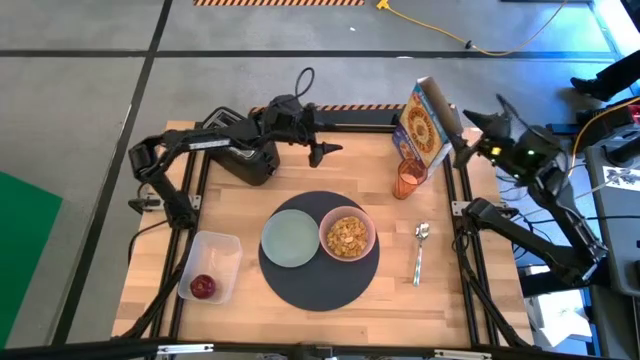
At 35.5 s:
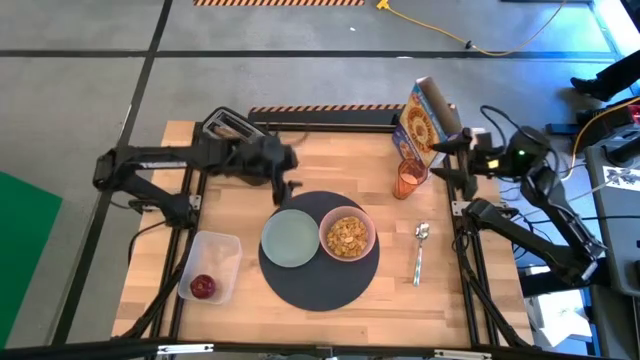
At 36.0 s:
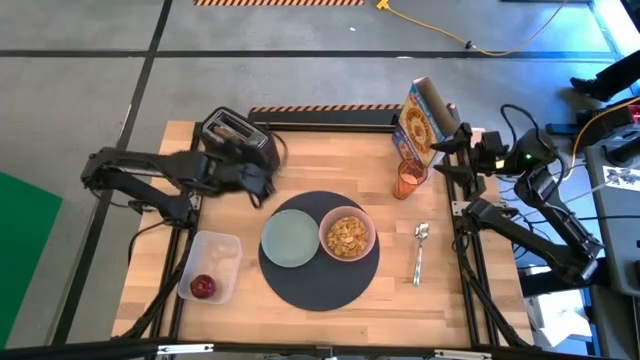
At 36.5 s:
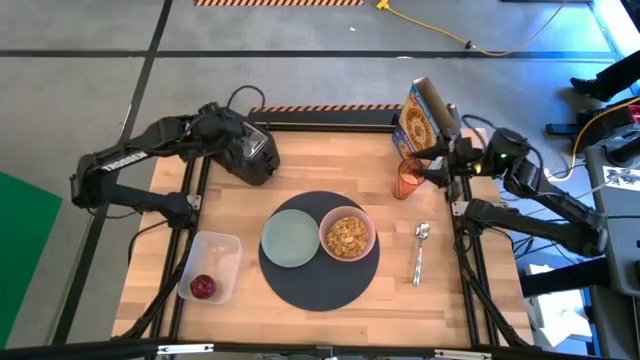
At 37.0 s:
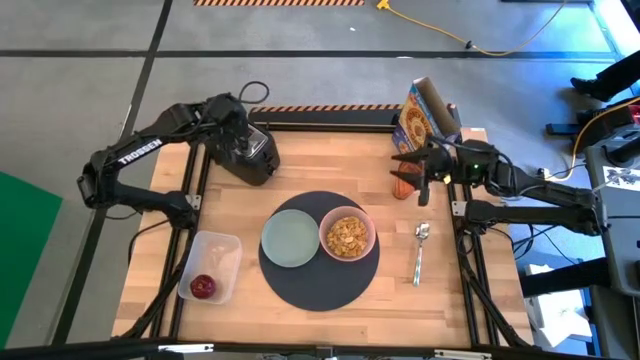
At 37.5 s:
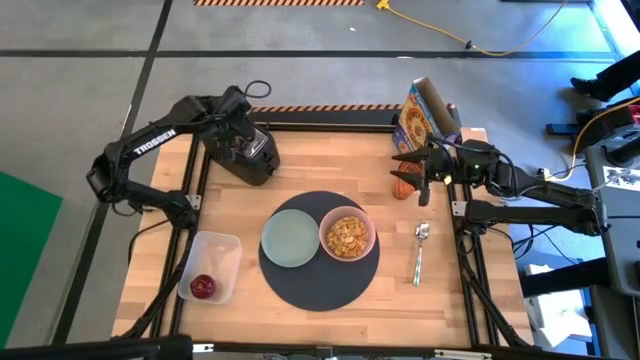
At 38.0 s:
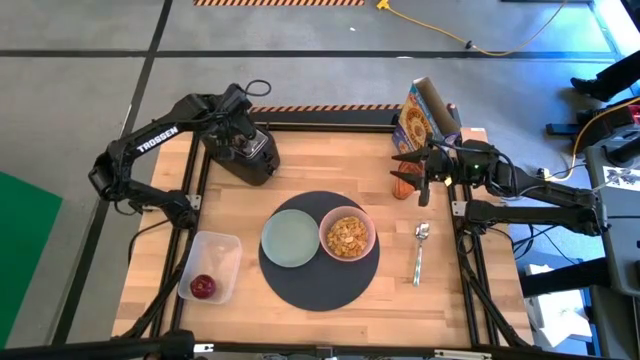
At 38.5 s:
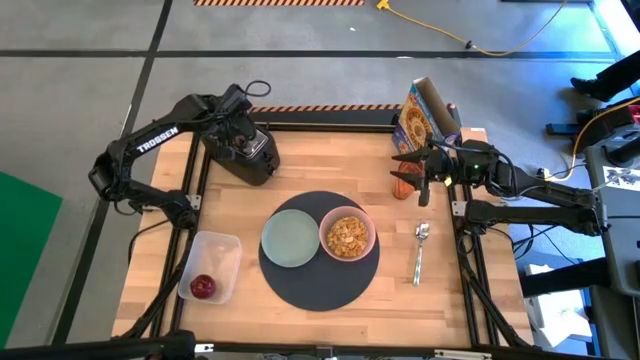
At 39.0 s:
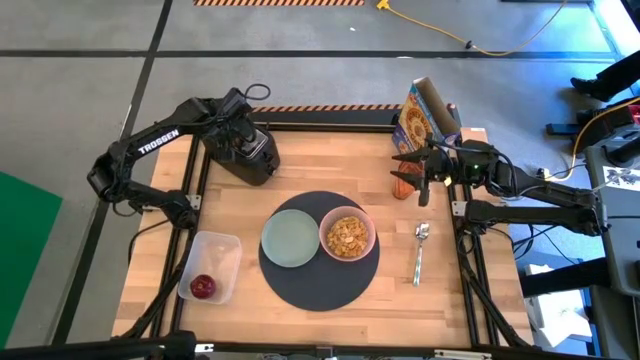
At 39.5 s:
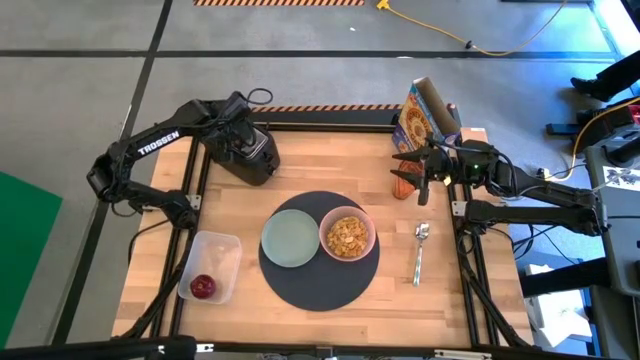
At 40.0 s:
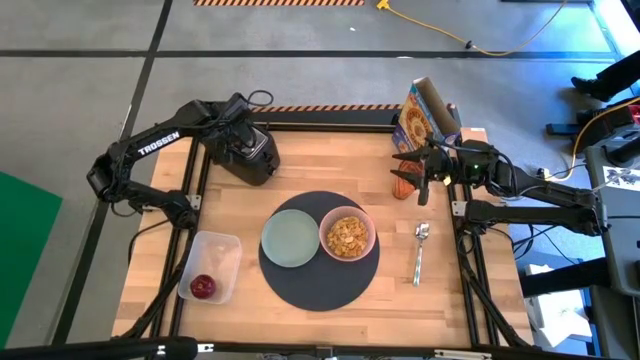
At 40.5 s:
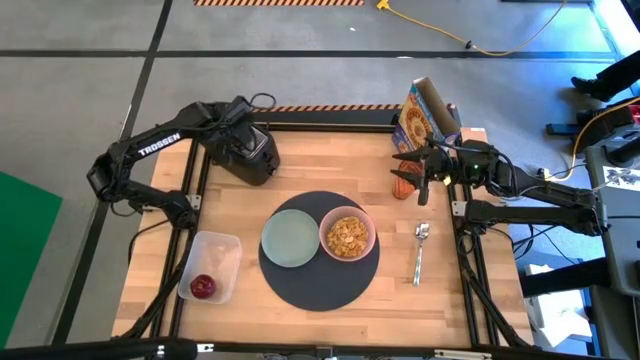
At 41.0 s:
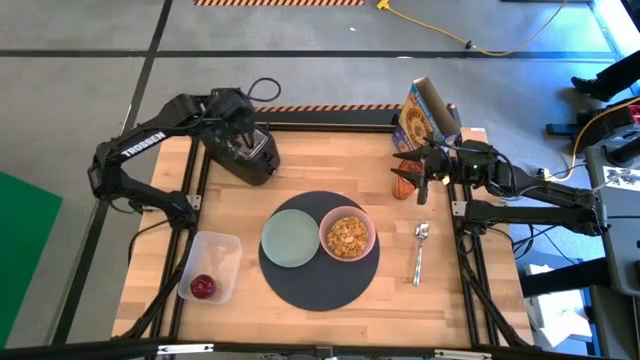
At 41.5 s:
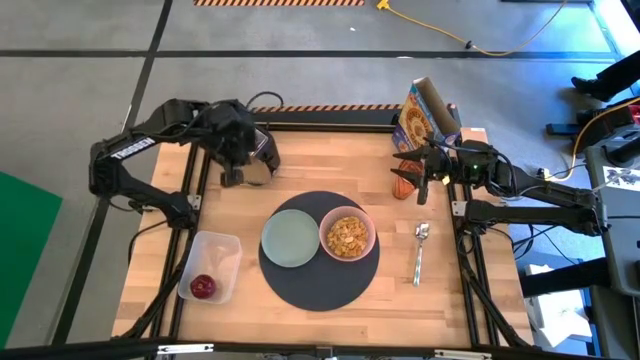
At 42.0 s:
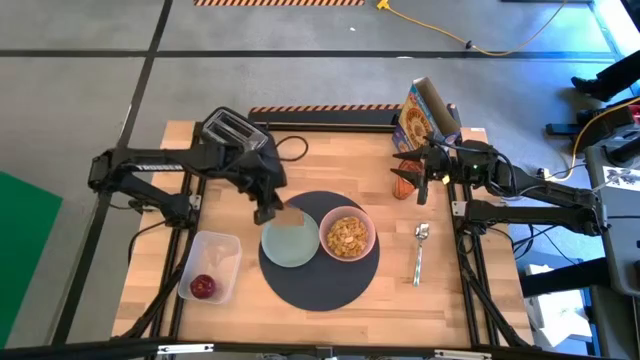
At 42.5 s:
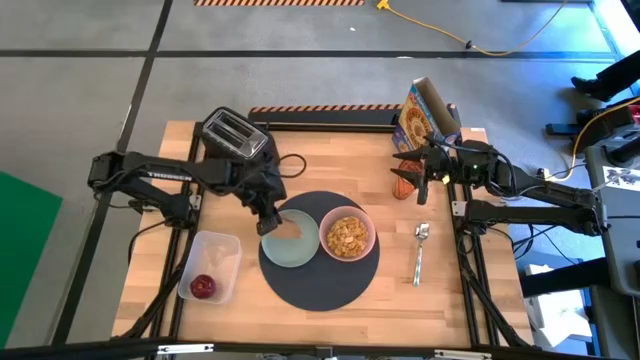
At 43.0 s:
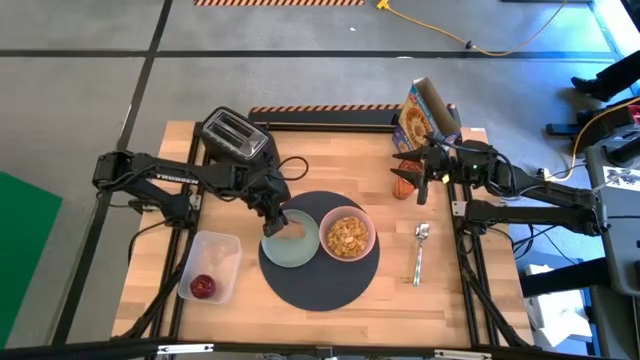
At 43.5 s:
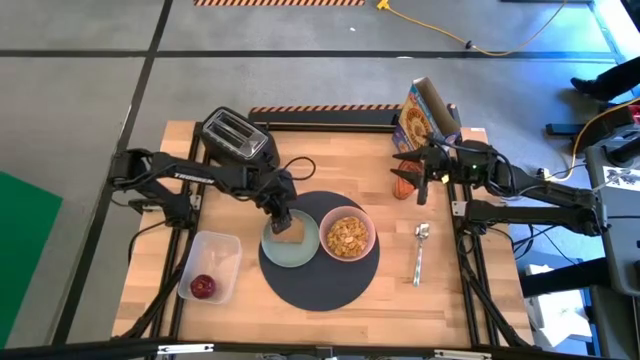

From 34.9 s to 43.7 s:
Task: Arrange a breakfast setting
Put the bread on the blue plate

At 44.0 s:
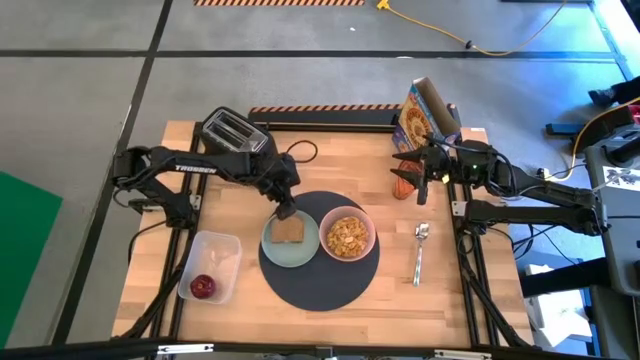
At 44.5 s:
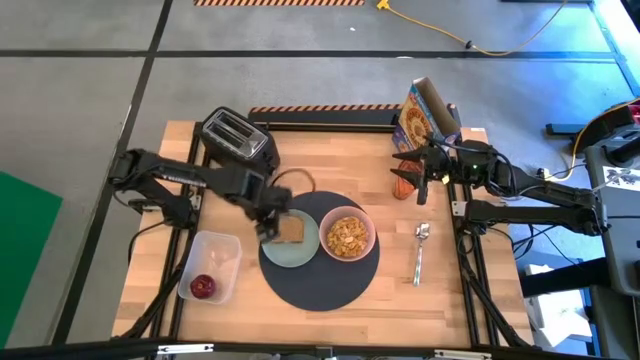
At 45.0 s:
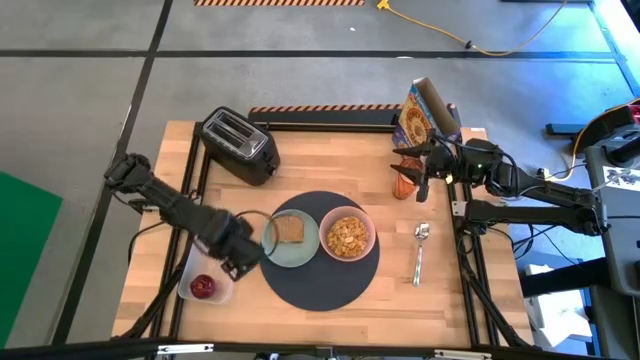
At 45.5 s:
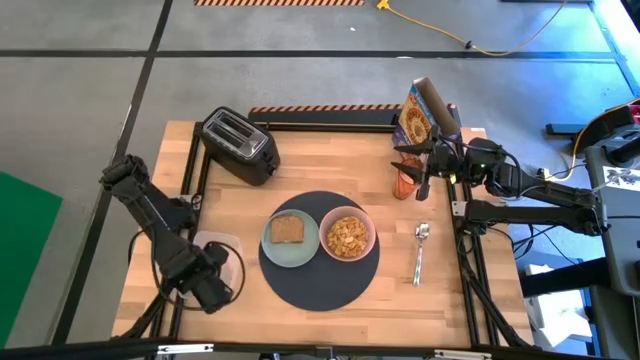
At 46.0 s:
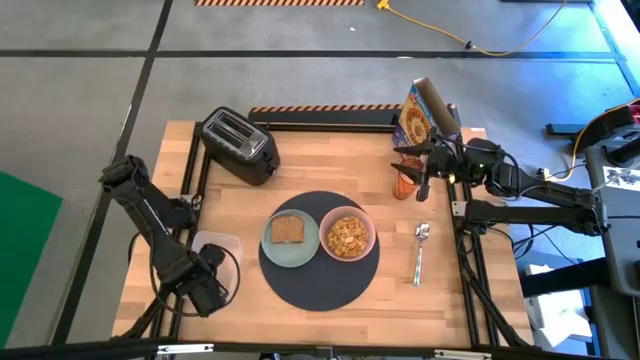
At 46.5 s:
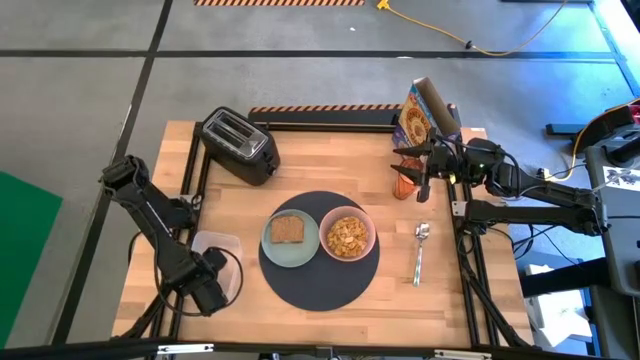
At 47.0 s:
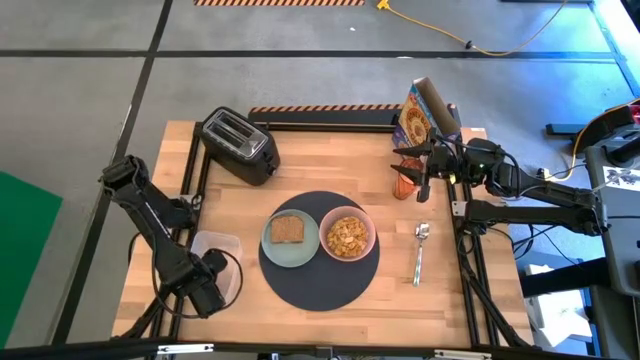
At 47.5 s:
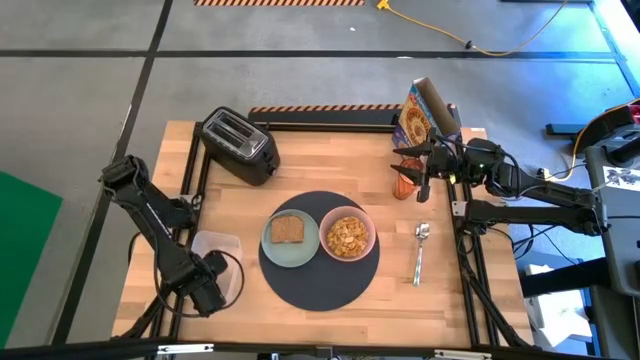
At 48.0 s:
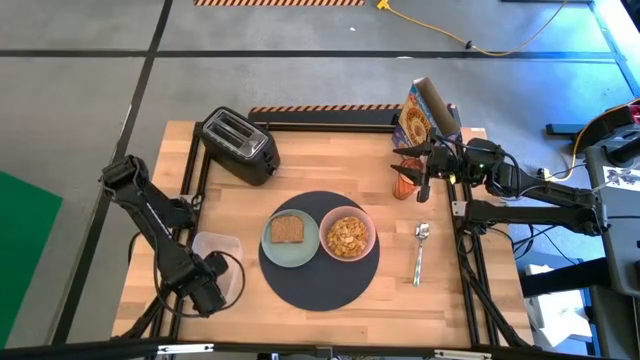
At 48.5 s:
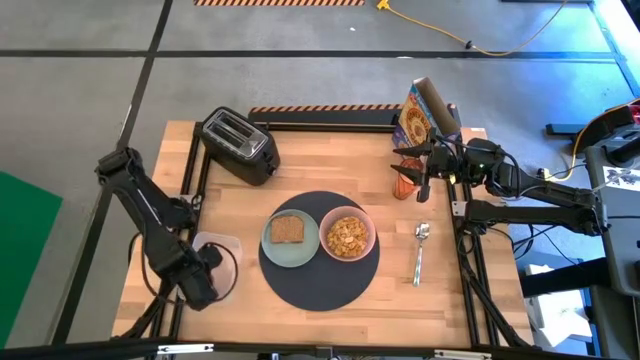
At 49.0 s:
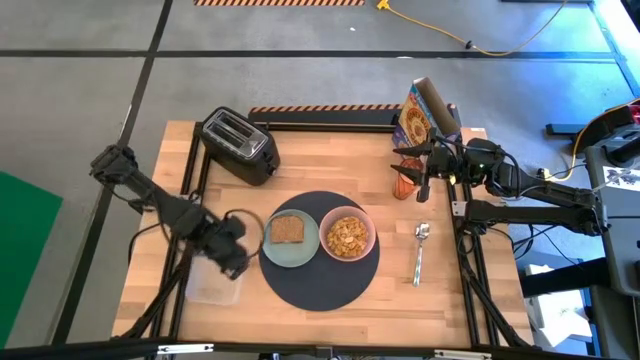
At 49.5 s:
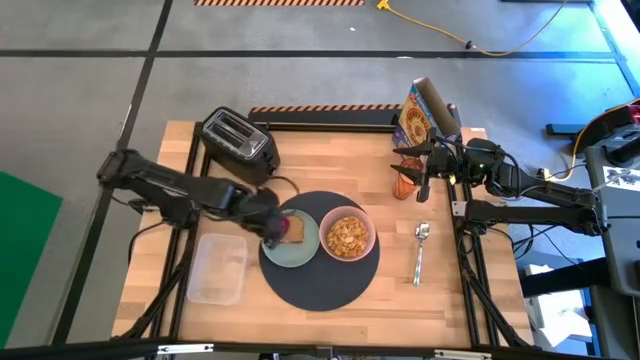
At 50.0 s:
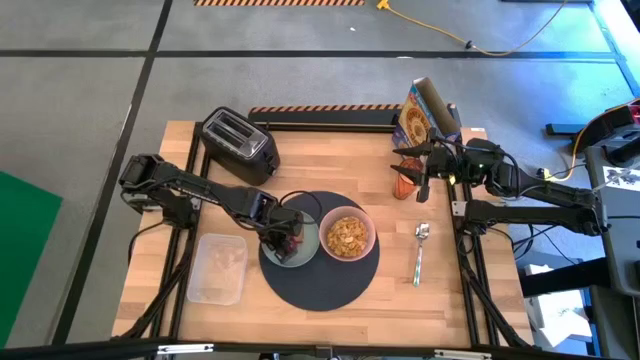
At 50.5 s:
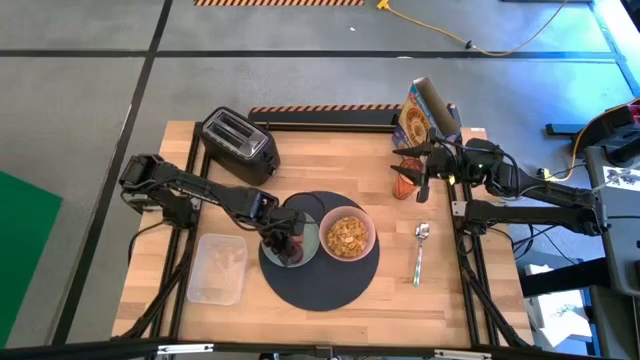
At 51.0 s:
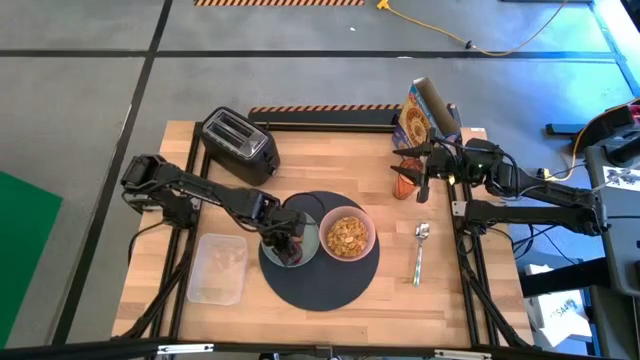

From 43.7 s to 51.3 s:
Put the apple on the blue plate

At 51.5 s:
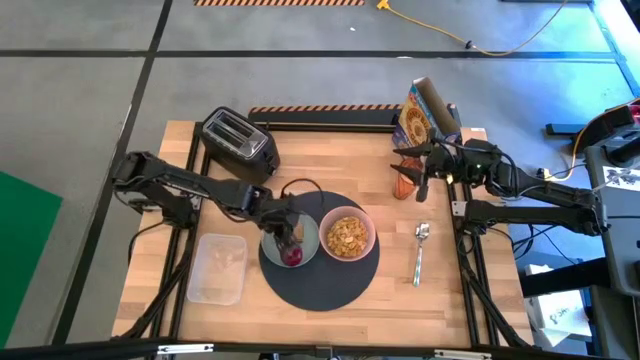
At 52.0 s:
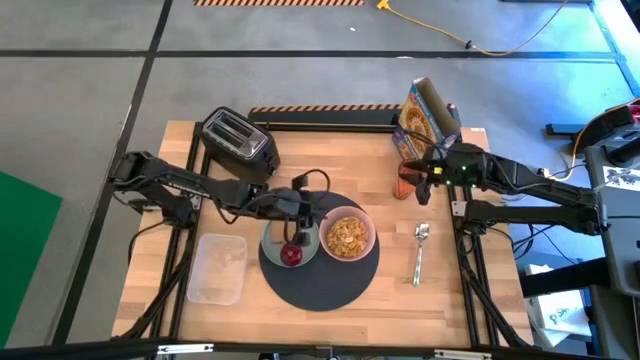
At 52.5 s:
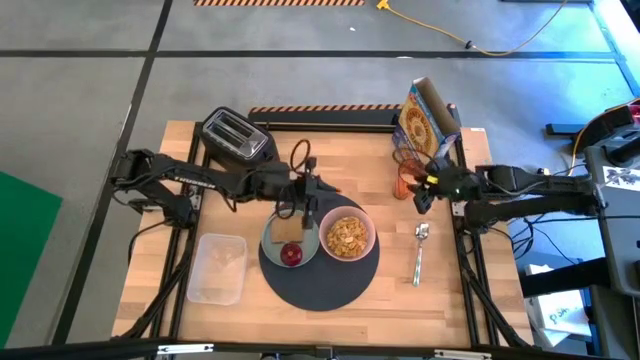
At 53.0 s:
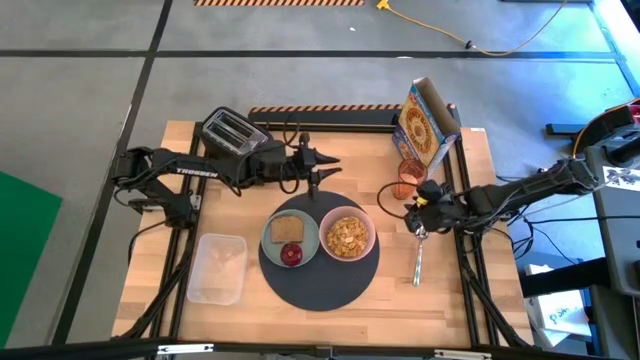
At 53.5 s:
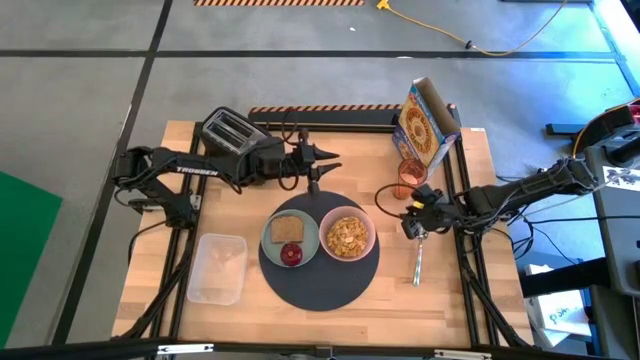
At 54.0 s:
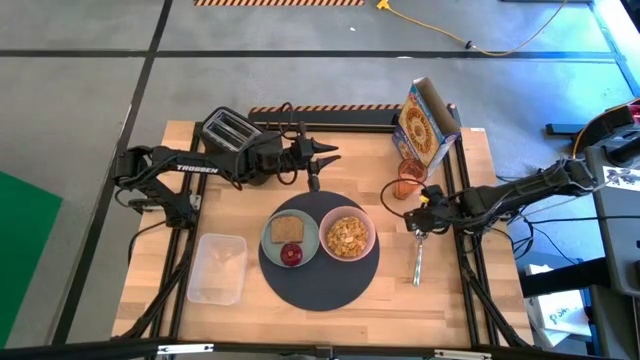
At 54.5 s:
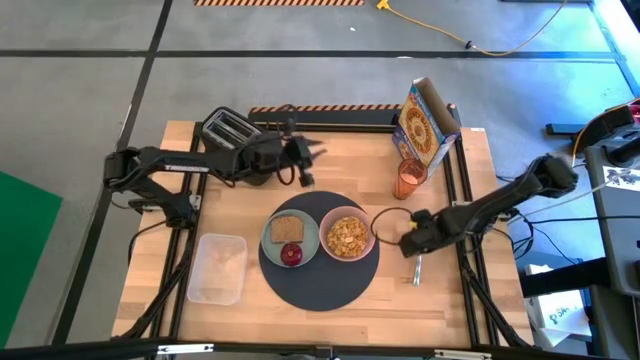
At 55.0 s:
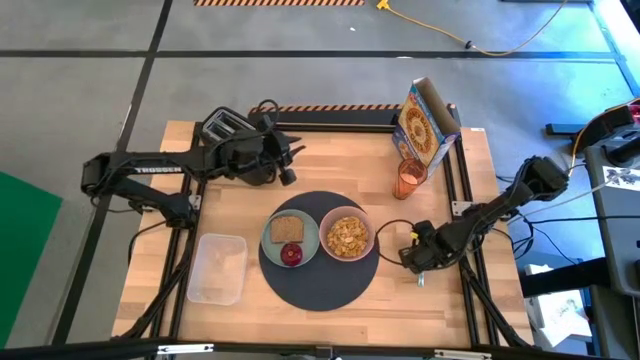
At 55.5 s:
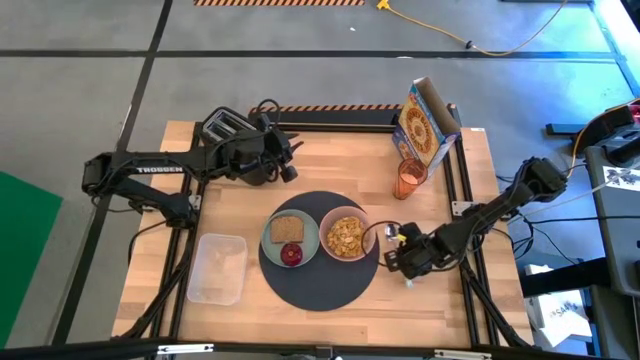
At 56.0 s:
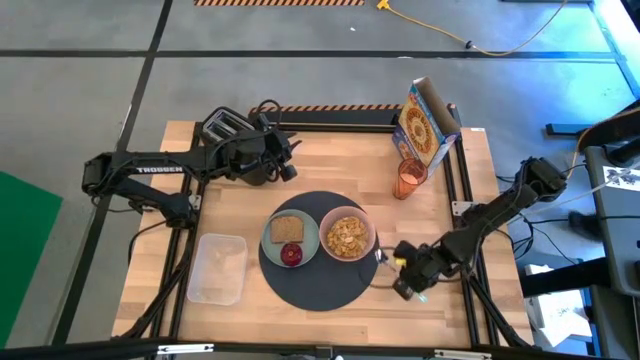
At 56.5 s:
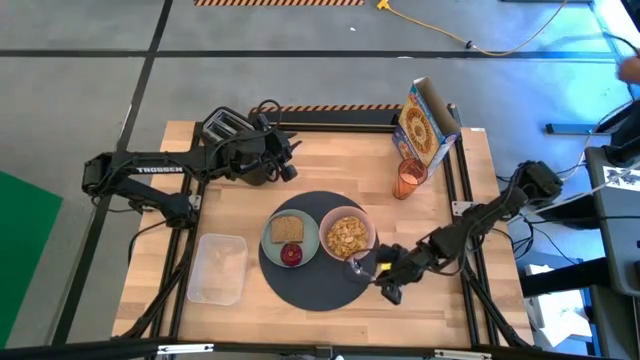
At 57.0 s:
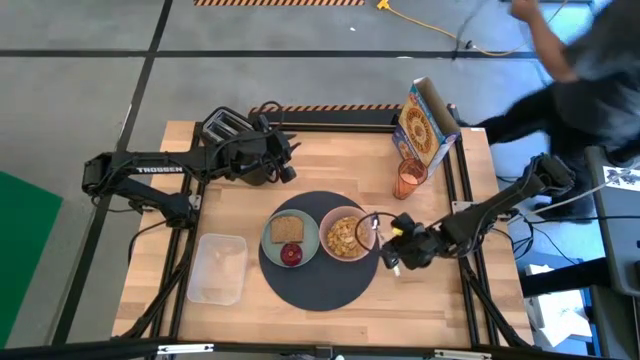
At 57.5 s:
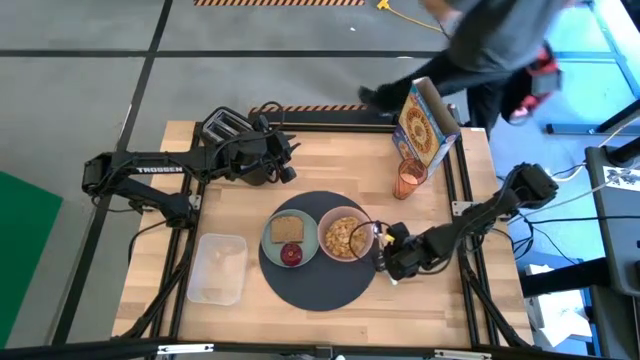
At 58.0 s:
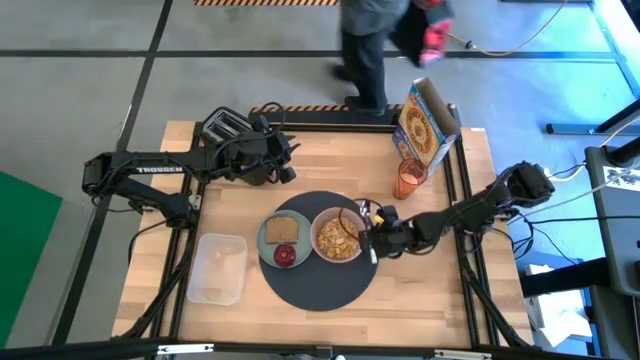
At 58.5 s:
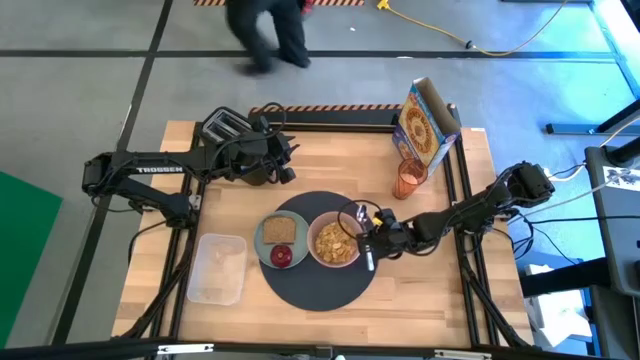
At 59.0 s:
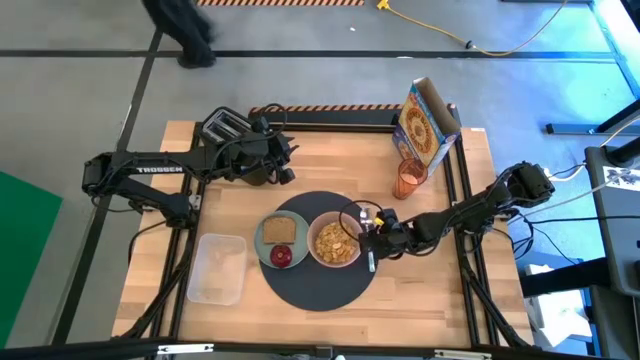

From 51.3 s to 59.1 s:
Put the light blue spoon on the placemat
